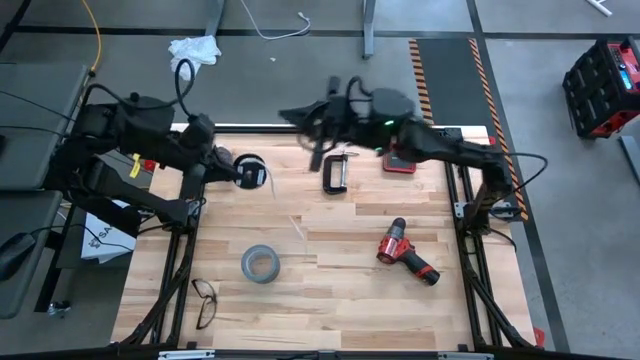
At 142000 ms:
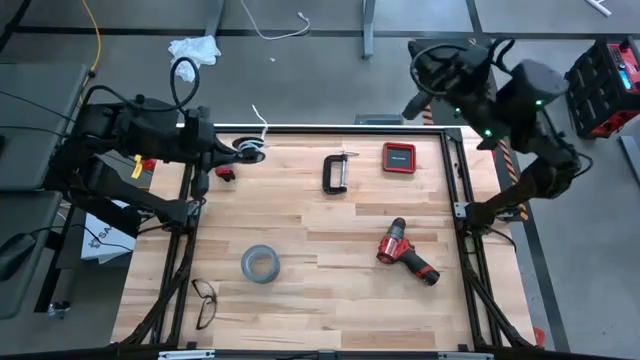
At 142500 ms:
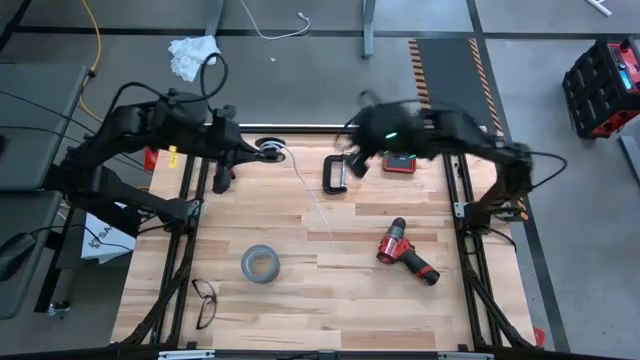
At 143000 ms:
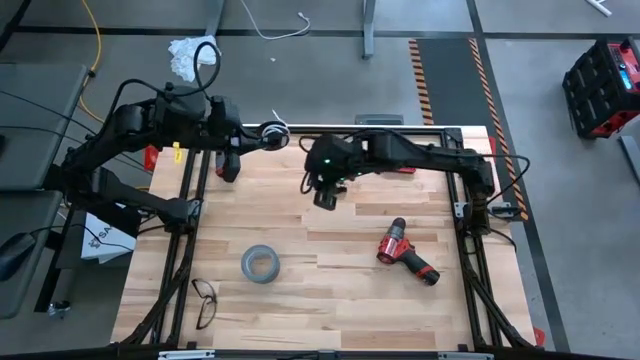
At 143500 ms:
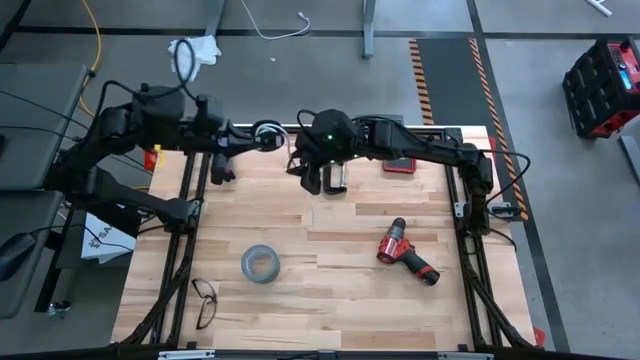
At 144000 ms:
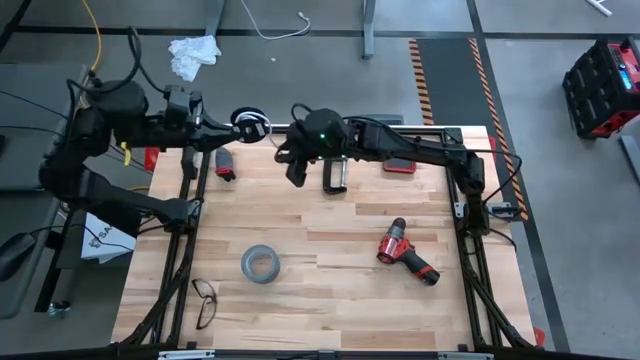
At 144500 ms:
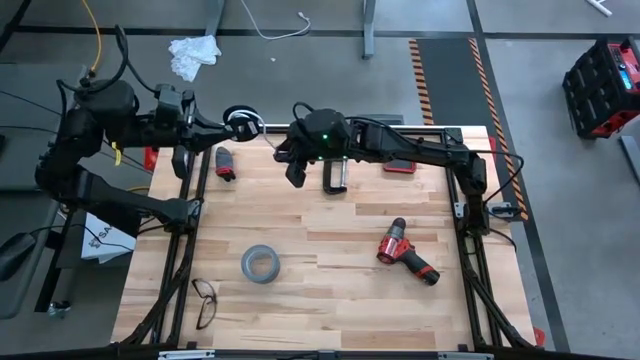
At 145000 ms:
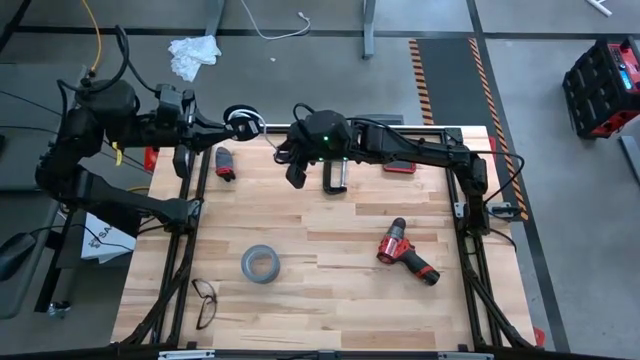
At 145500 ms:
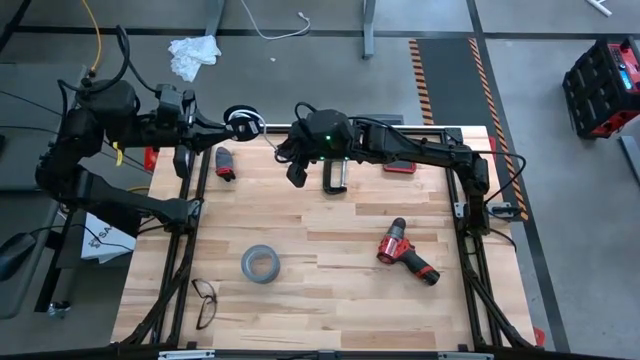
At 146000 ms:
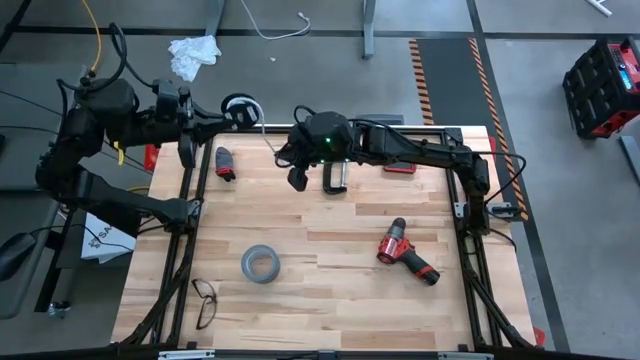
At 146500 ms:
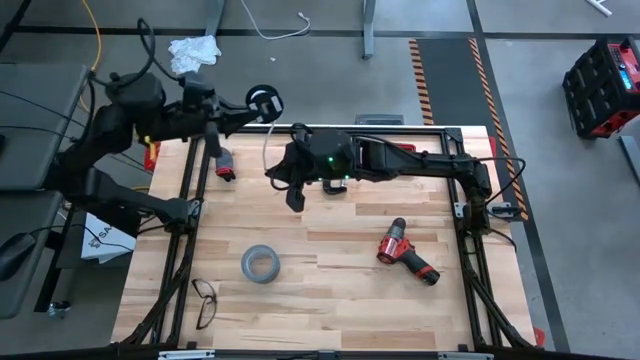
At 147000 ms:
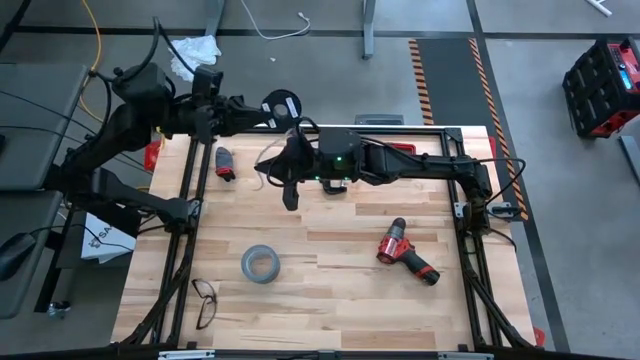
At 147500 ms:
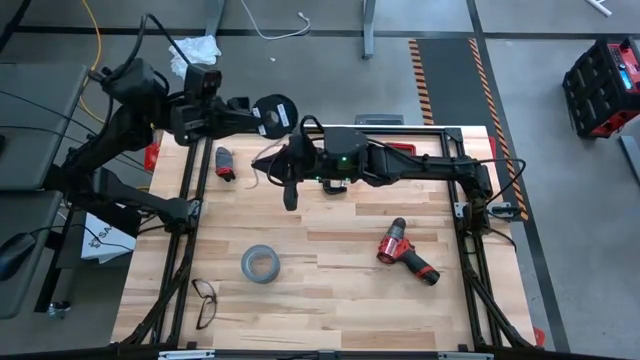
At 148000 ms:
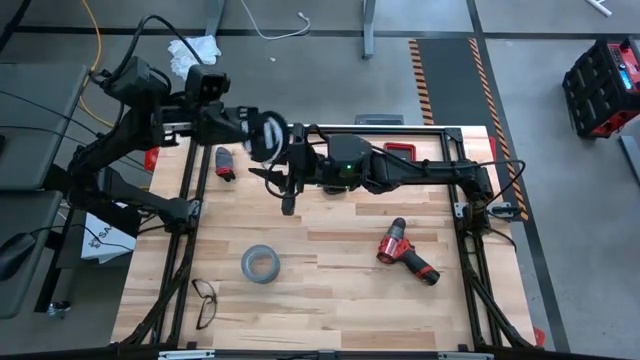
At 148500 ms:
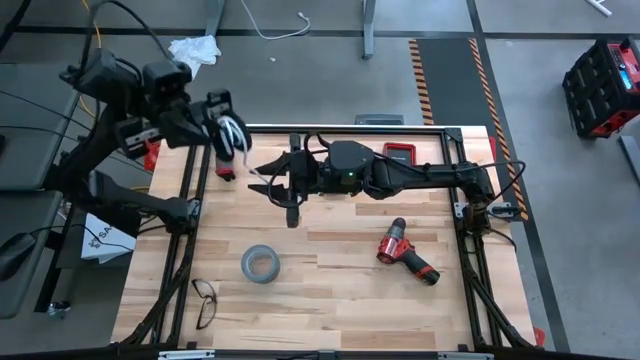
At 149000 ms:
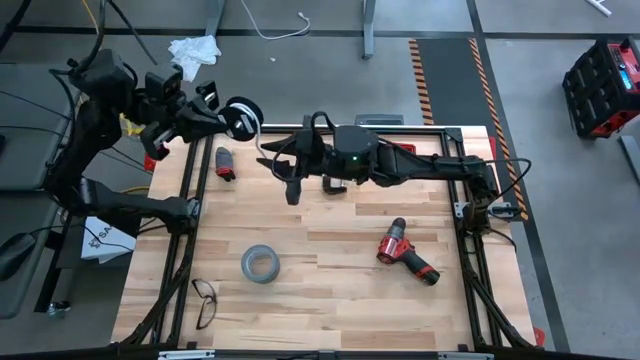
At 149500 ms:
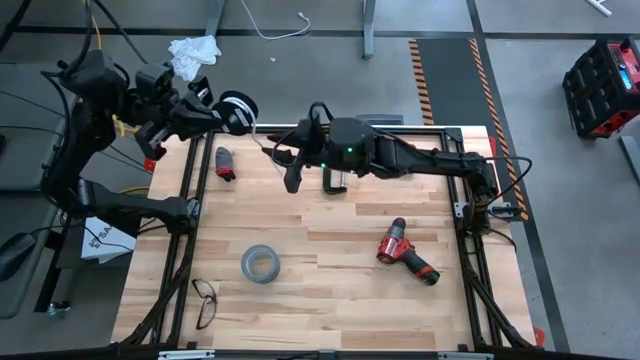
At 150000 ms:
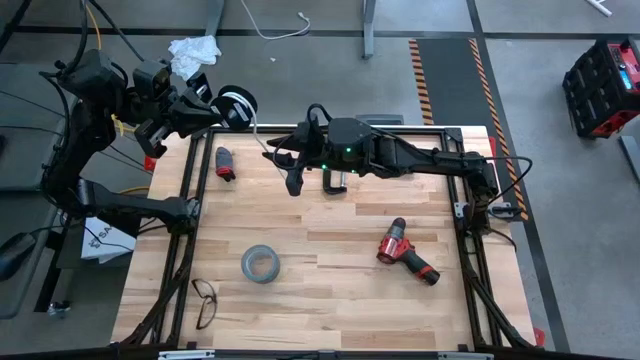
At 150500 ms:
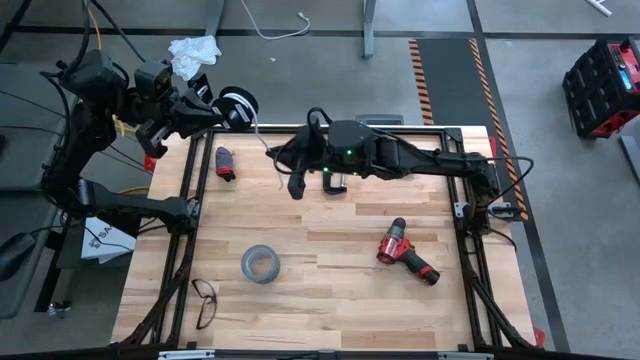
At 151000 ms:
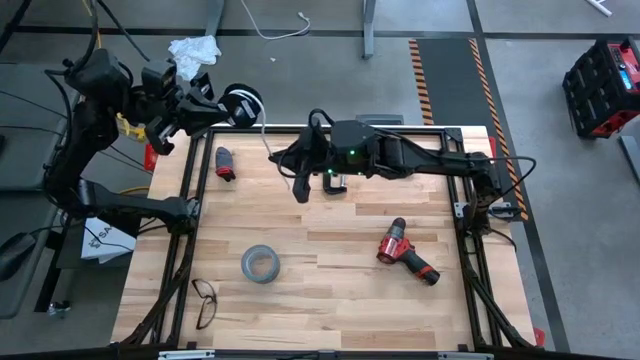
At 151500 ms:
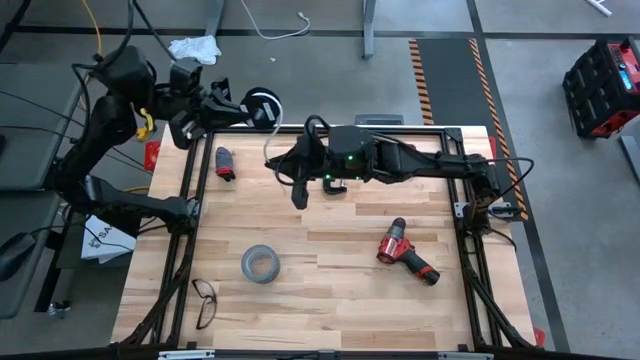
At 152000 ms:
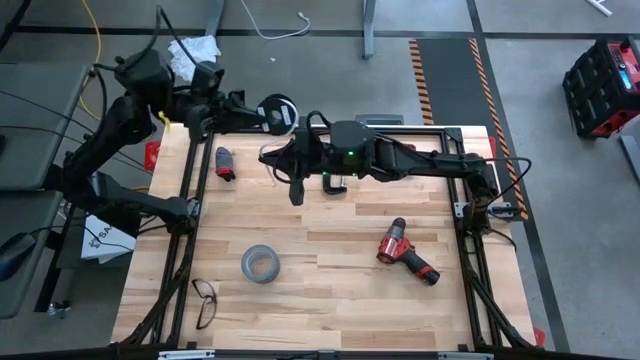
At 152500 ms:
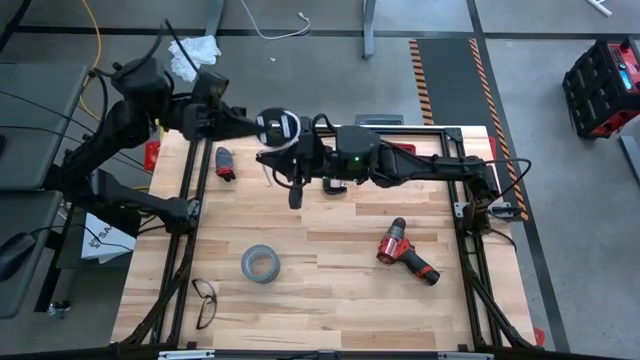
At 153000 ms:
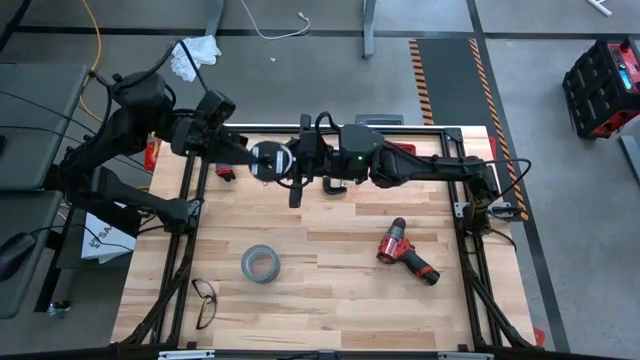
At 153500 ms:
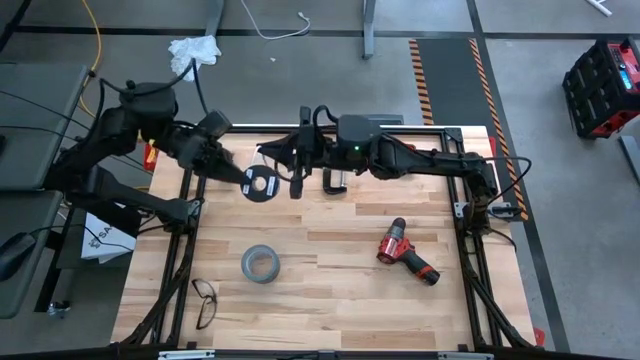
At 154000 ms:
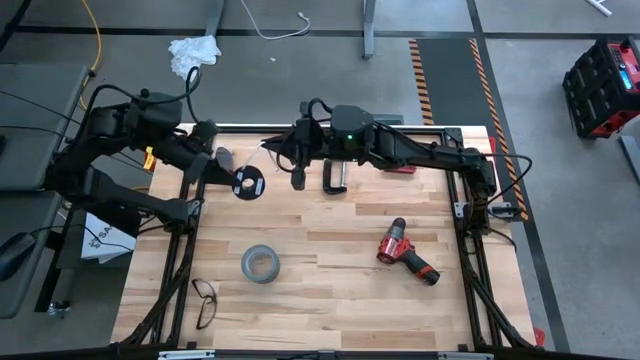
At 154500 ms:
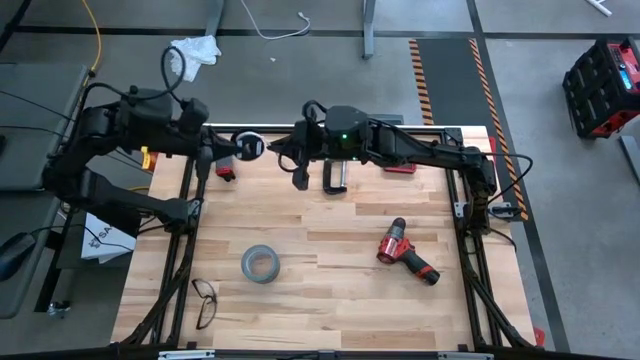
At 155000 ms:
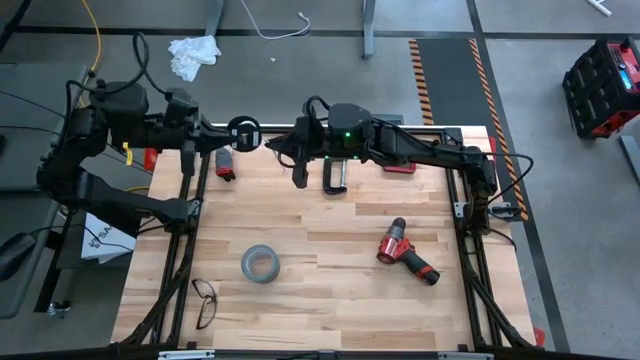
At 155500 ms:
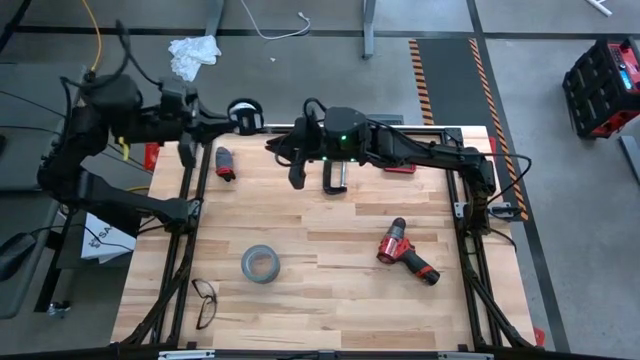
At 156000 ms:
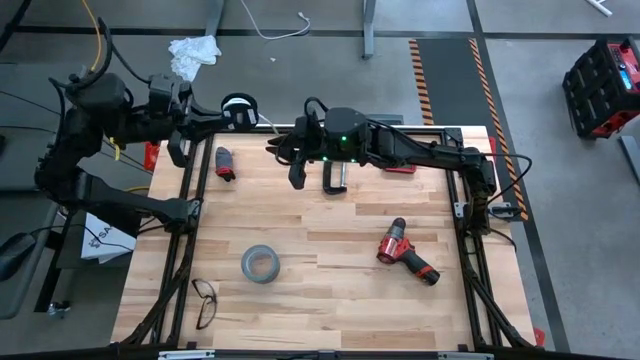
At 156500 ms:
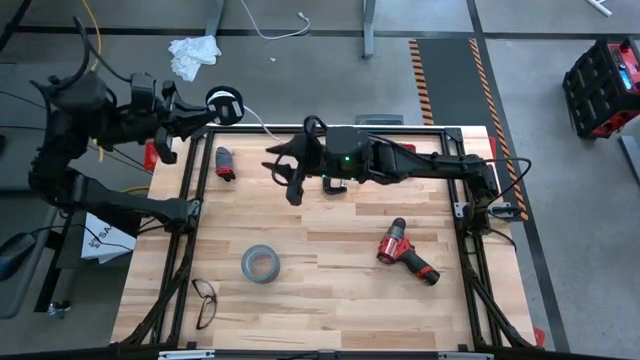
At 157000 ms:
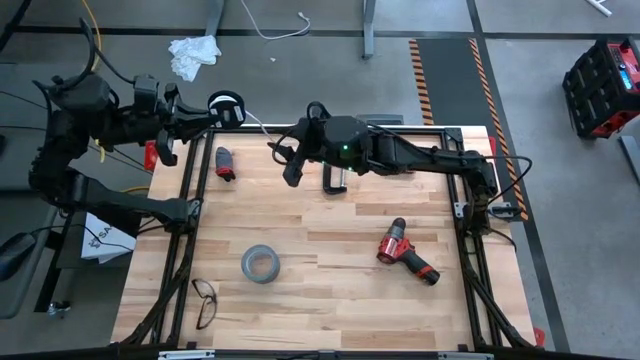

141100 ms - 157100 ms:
Task: Coil cords
Coil the white wire

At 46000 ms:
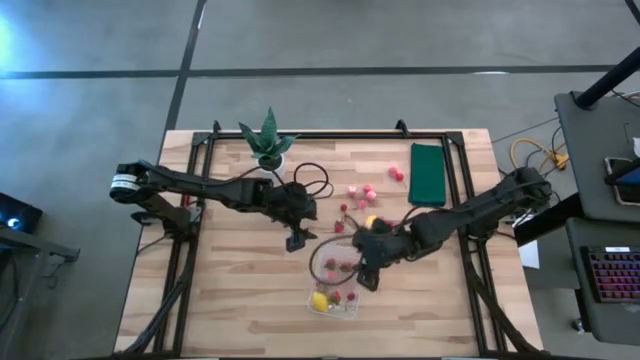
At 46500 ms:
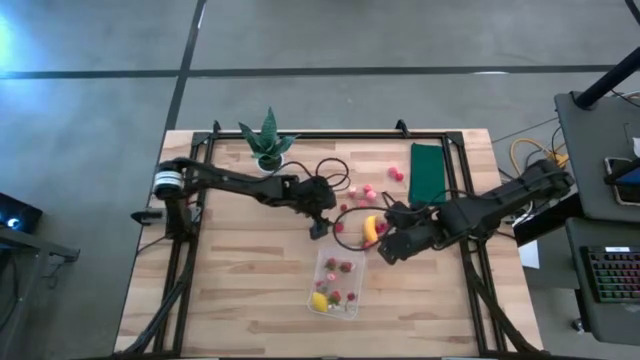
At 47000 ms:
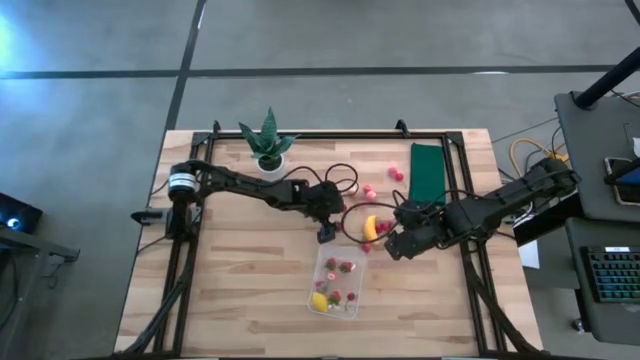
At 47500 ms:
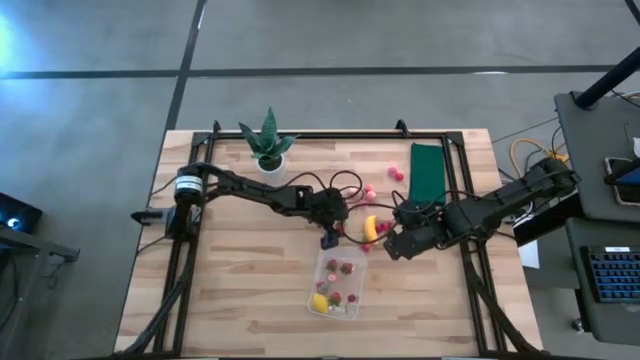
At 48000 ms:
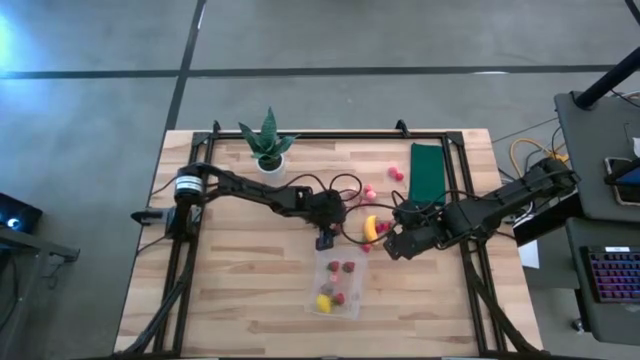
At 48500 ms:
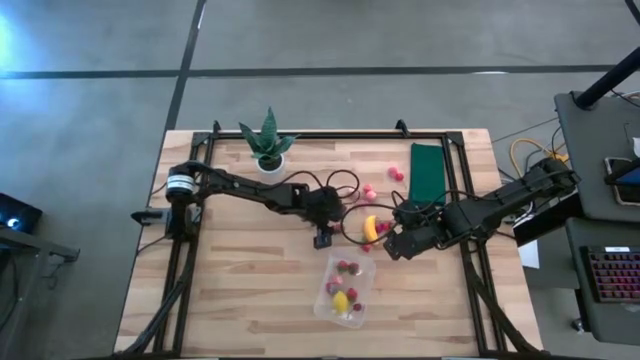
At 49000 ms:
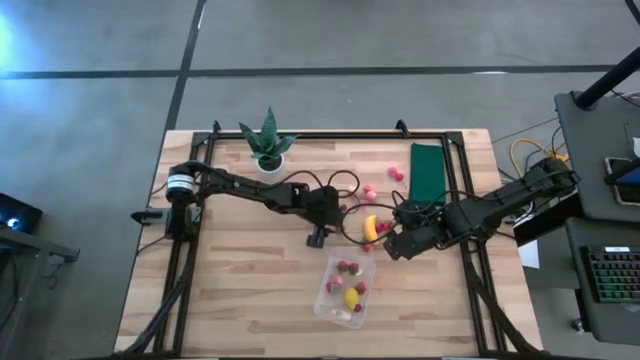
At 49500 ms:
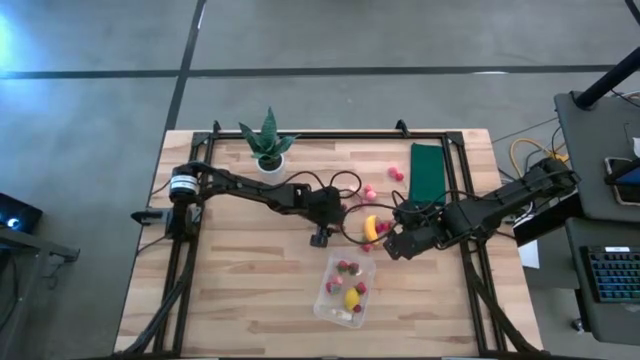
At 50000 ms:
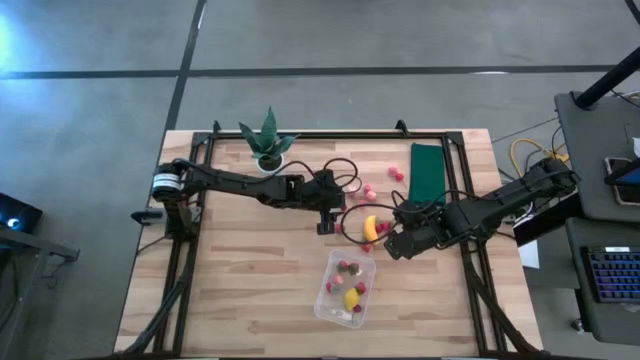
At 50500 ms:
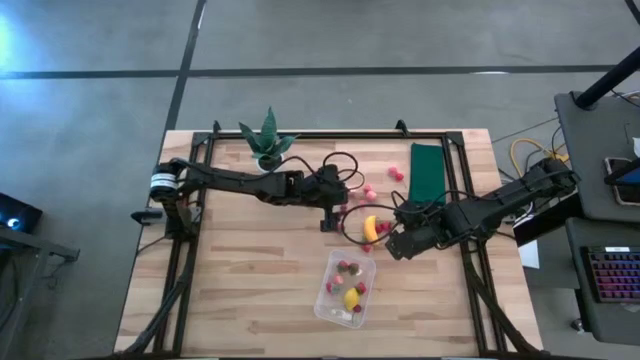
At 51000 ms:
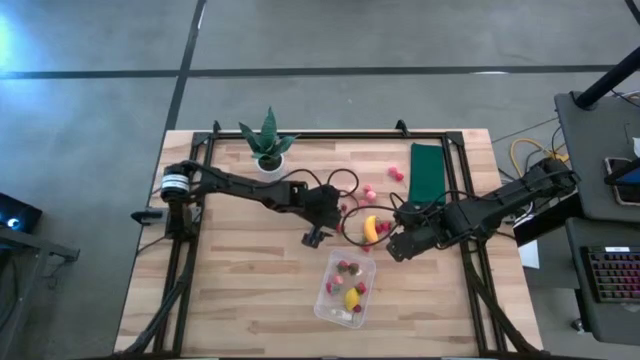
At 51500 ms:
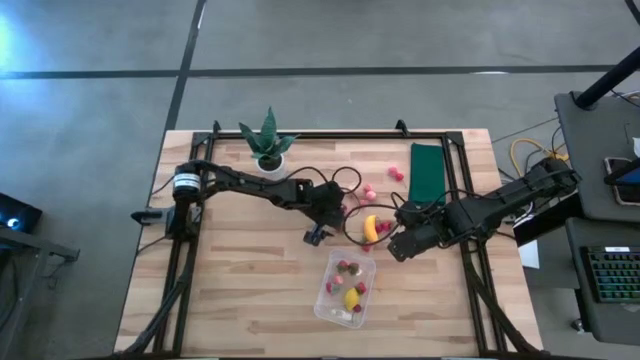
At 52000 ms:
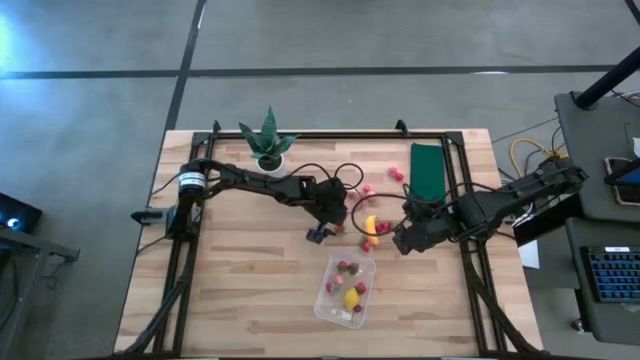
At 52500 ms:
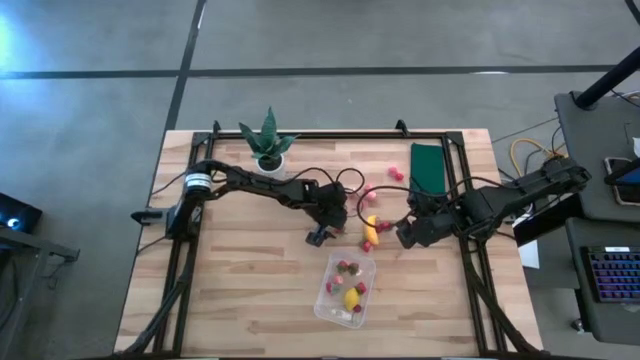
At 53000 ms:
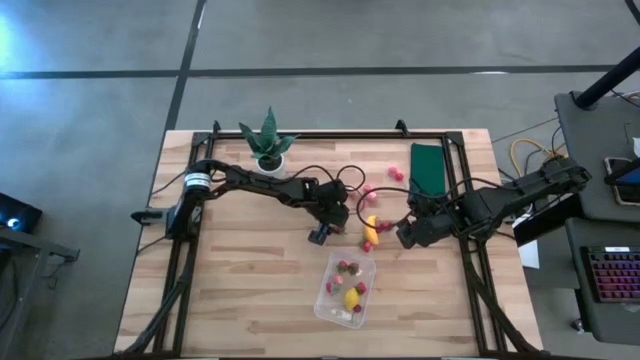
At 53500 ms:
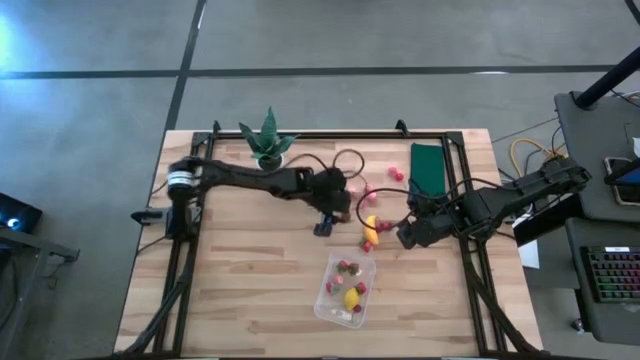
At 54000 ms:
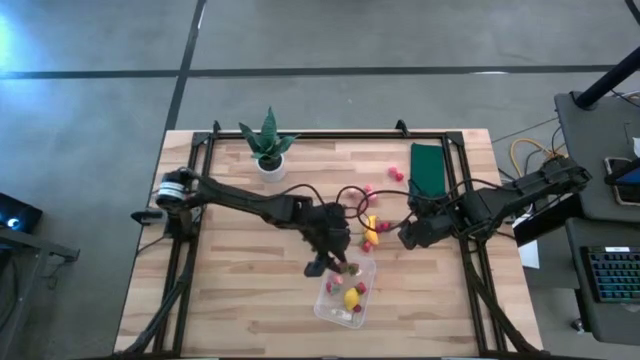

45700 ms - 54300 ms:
Task: Pick and placing Produce into tupperware
Put the strawberry into the transparent bin
